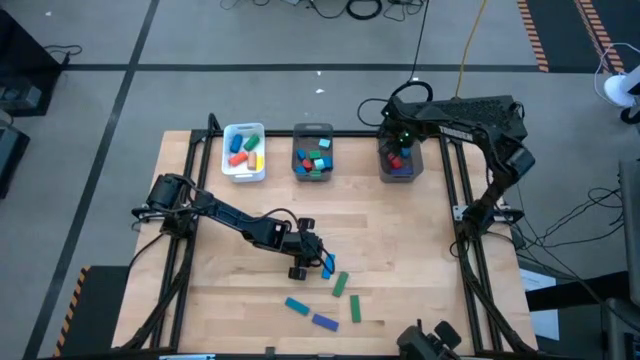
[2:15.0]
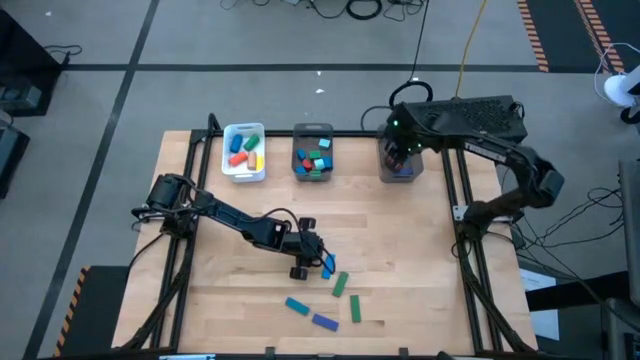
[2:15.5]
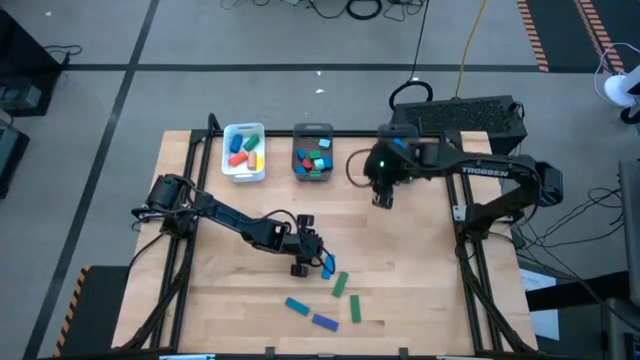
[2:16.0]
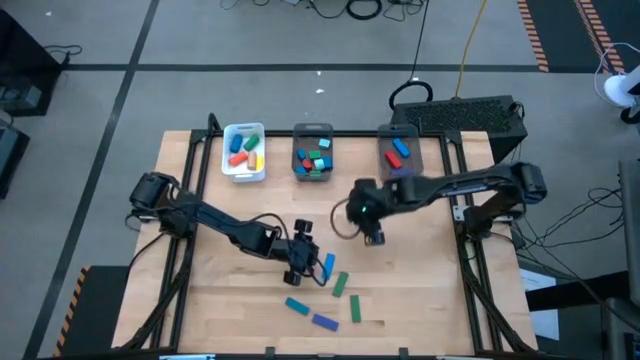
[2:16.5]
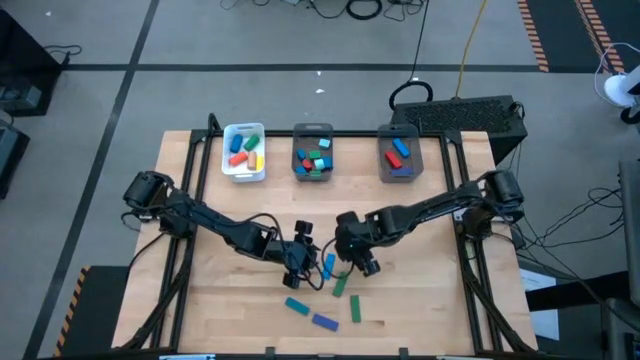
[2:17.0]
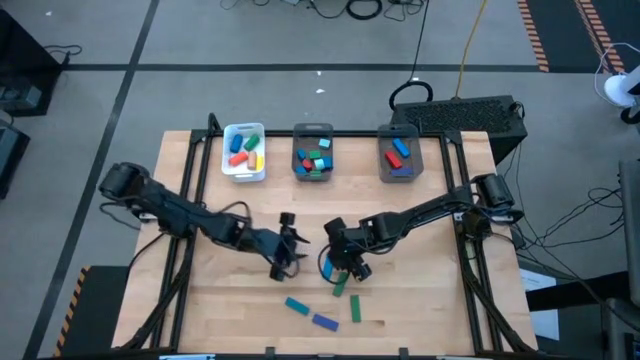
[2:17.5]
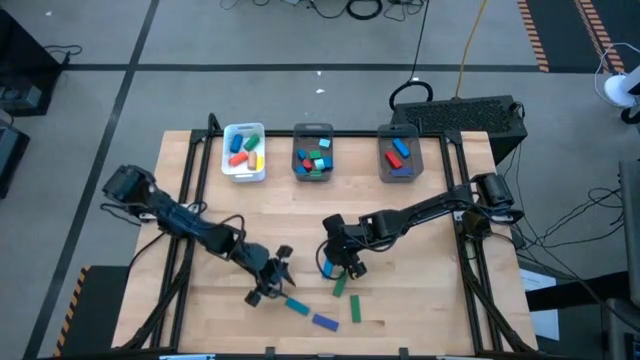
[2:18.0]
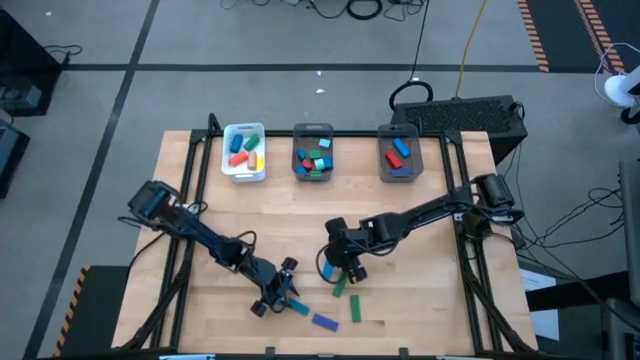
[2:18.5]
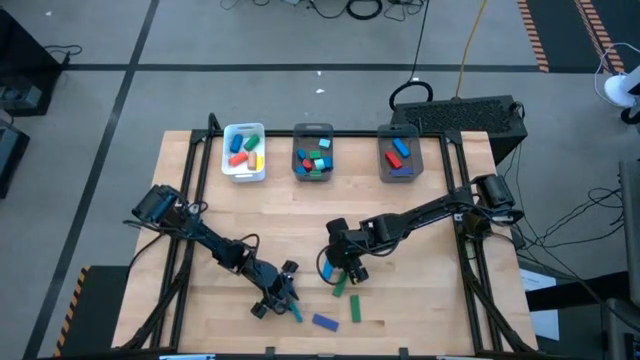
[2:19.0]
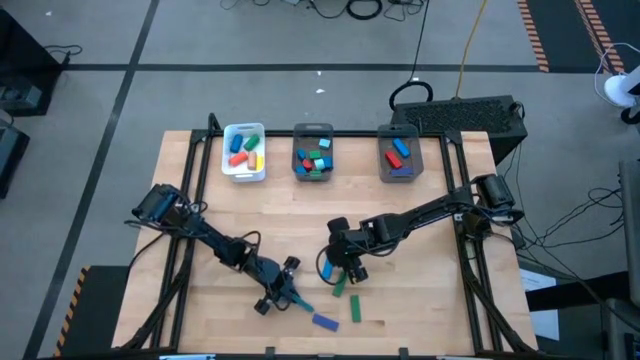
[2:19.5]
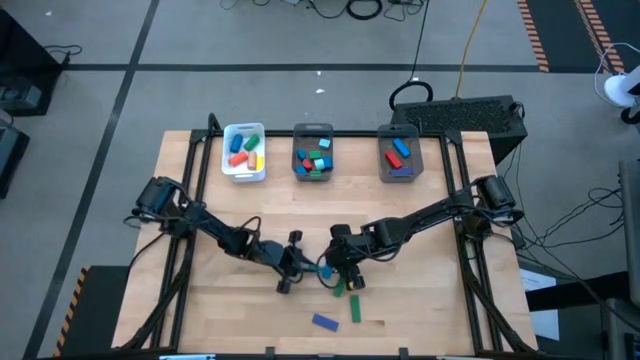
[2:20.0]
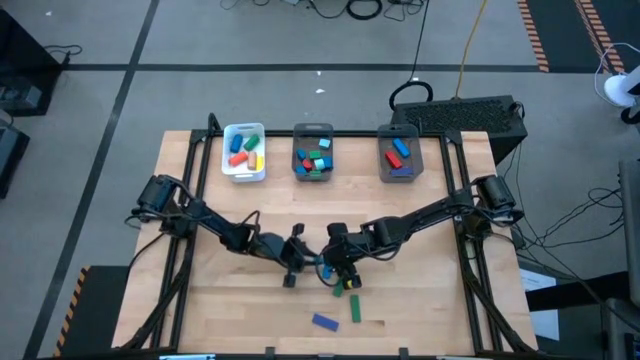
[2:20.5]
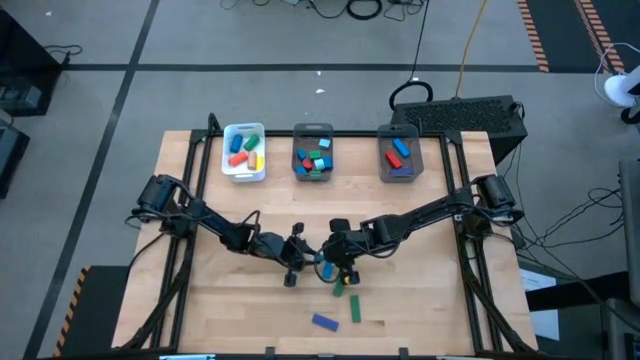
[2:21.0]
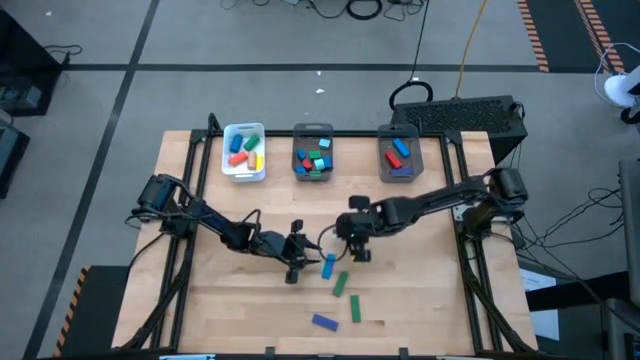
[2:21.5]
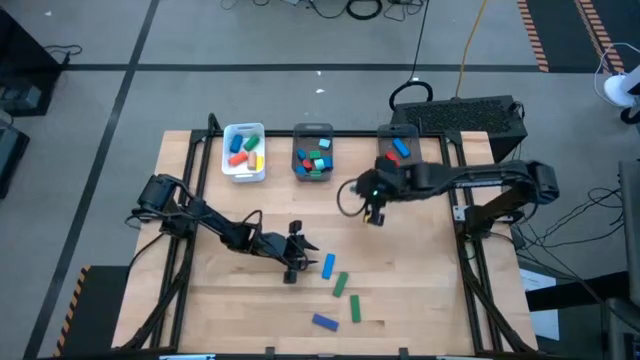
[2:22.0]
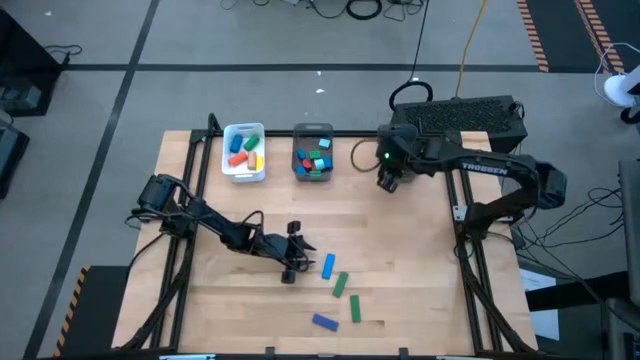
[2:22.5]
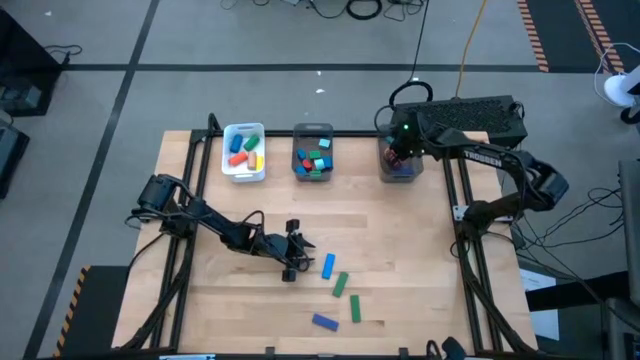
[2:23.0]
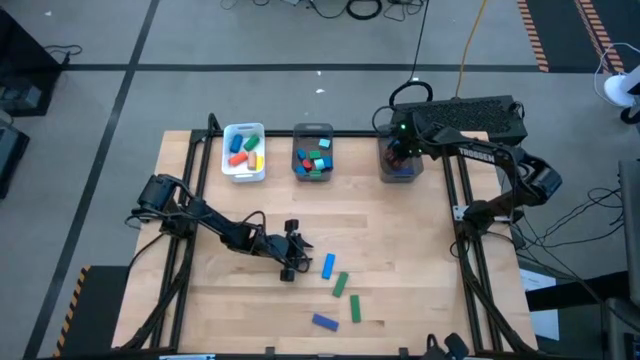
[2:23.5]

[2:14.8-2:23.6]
Task: Sort blocks by size
Put the blue rectangular block into the right black bin

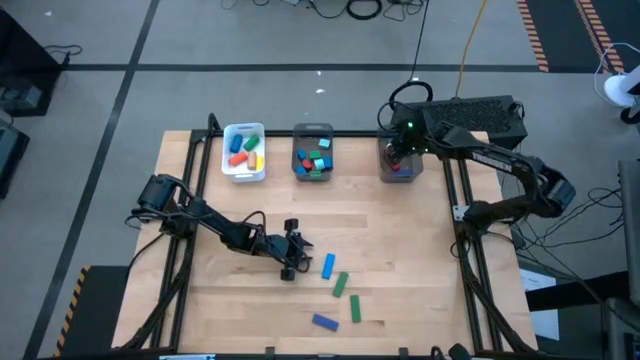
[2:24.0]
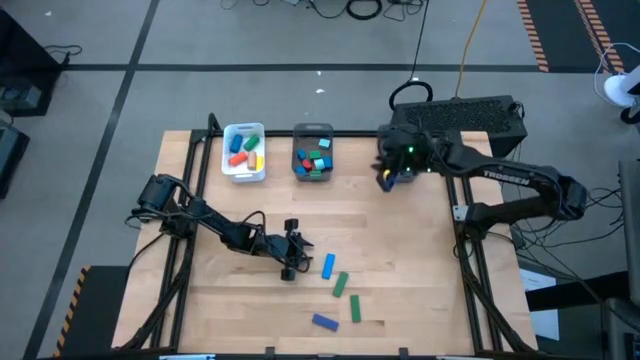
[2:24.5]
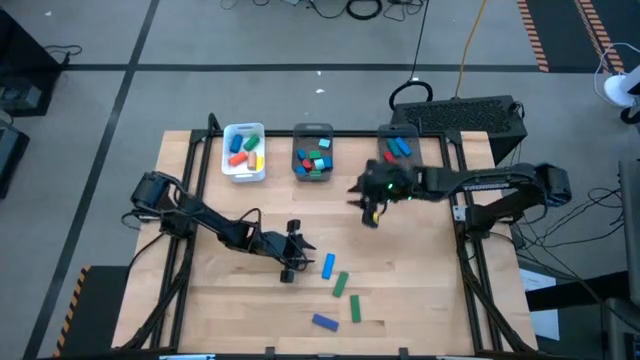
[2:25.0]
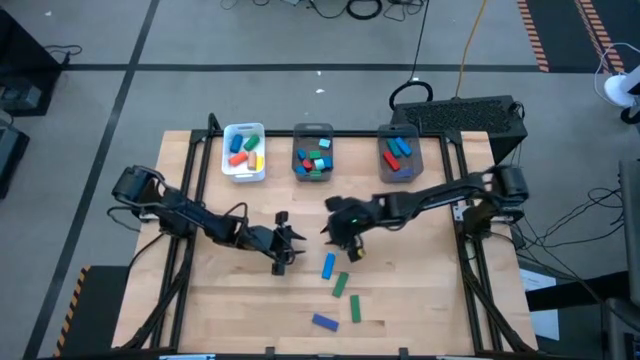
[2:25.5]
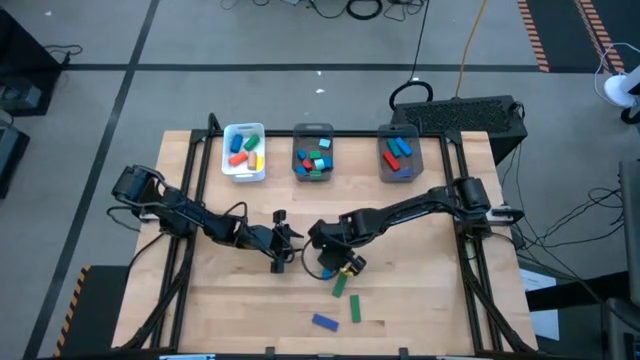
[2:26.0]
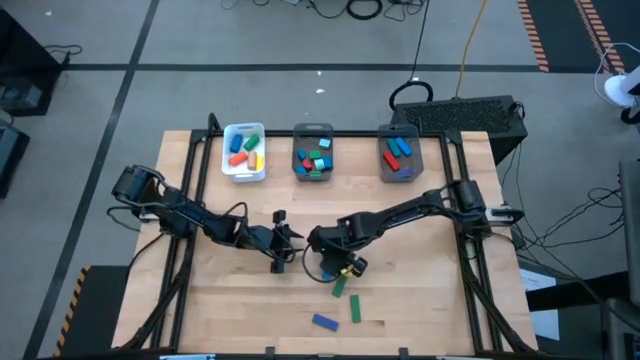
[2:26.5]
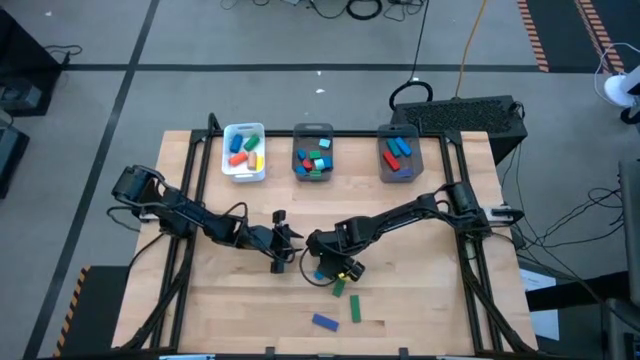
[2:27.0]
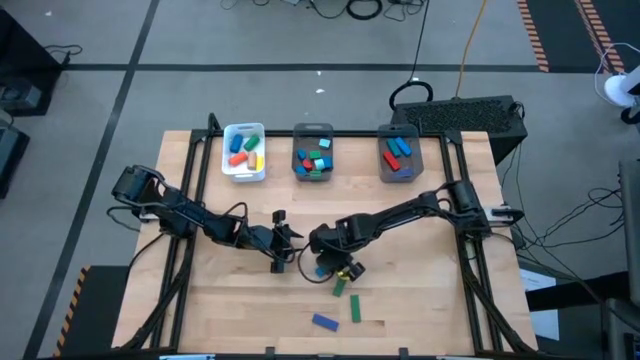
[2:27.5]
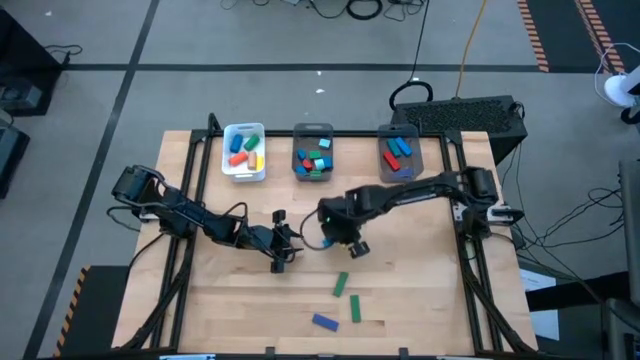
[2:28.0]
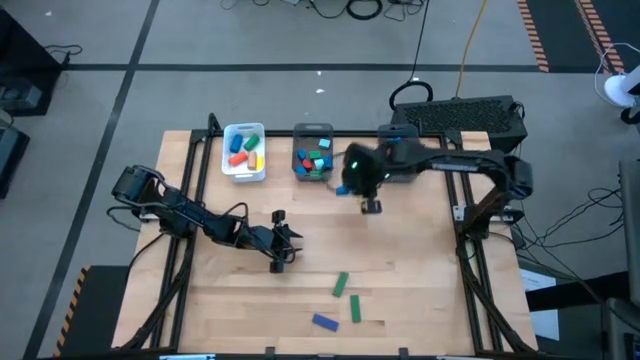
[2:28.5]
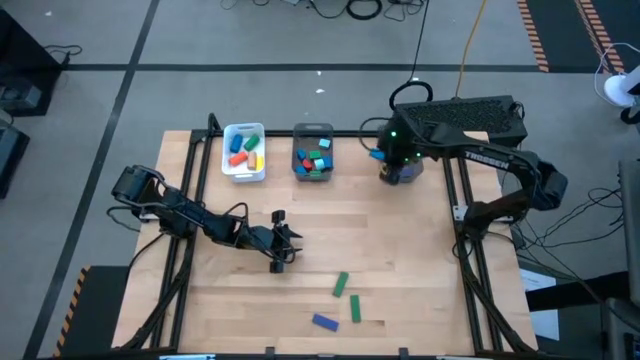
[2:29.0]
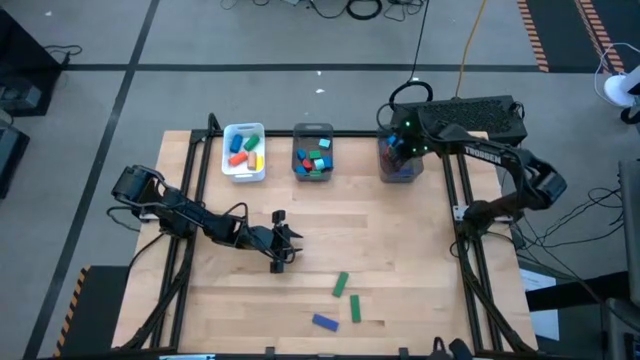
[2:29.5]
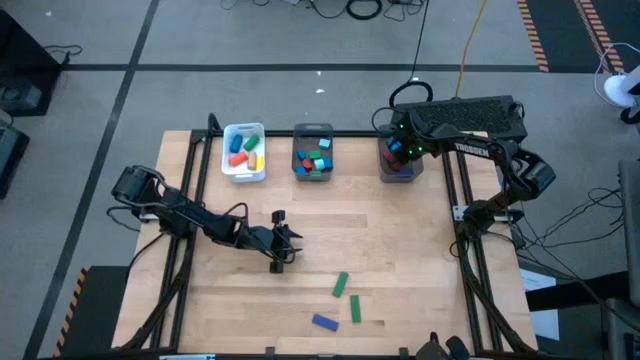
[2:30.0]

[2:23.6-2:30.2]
Put the light blue rectangular block into the right black bin

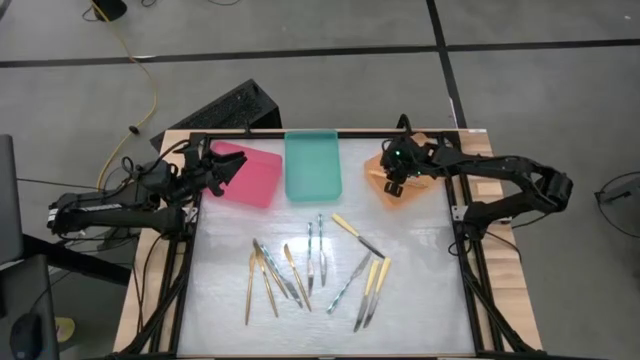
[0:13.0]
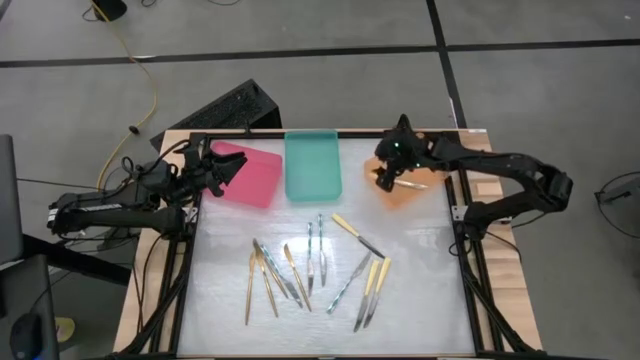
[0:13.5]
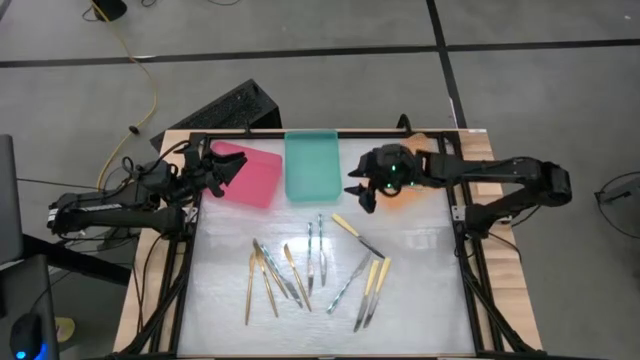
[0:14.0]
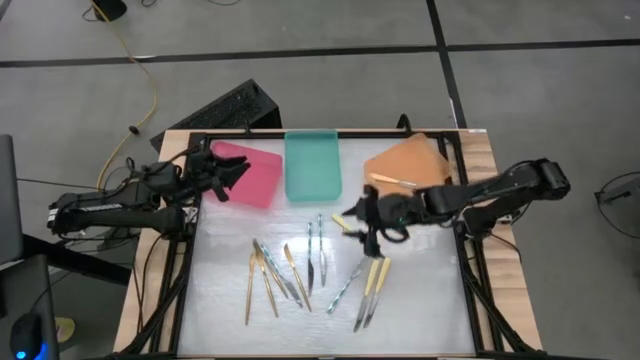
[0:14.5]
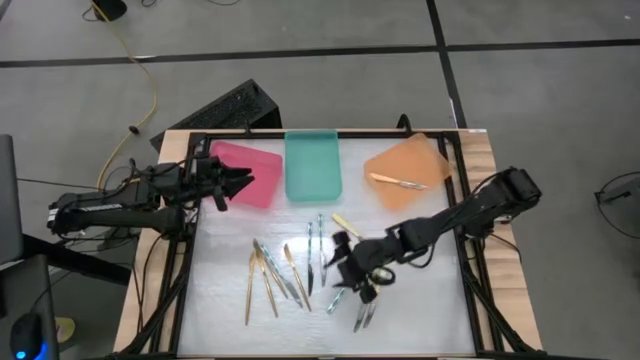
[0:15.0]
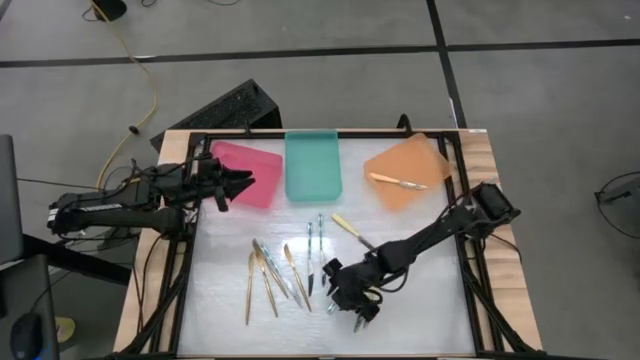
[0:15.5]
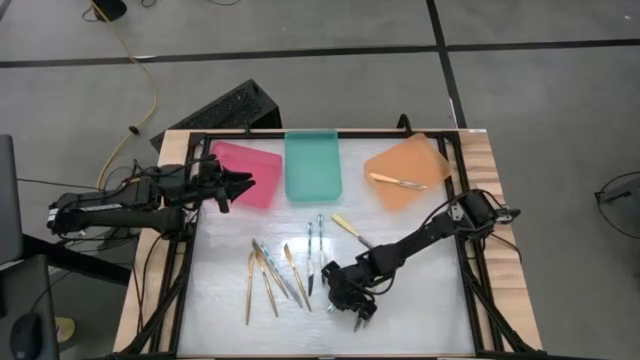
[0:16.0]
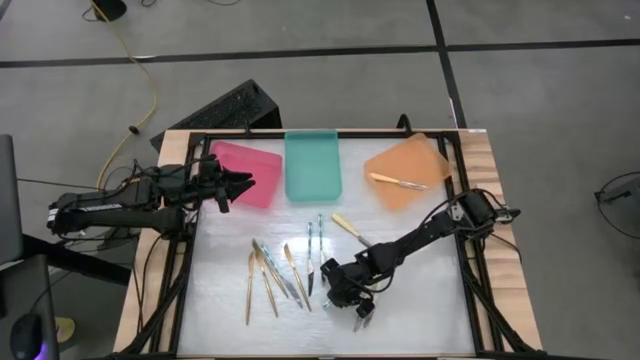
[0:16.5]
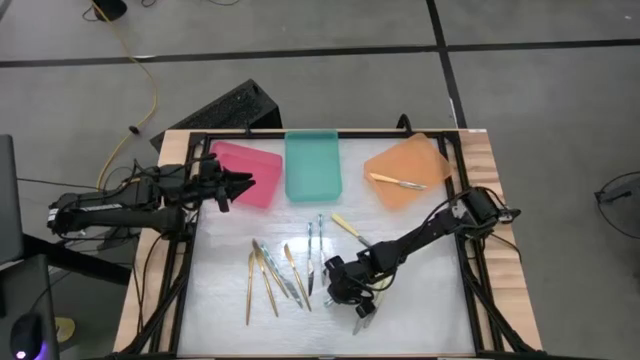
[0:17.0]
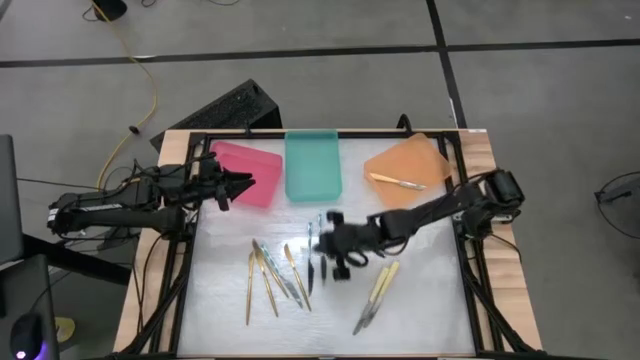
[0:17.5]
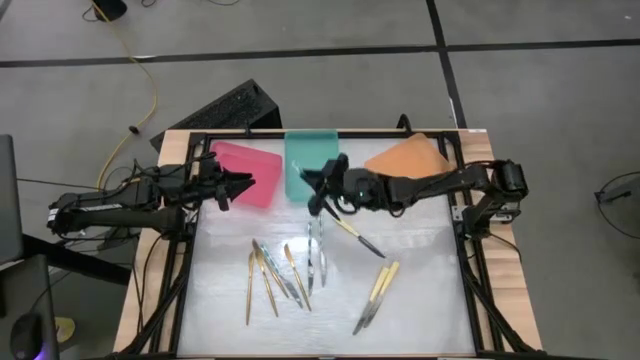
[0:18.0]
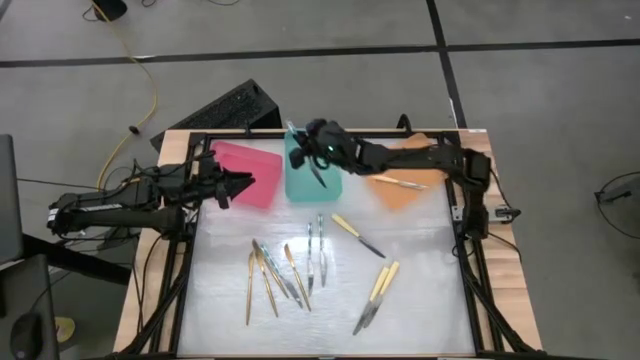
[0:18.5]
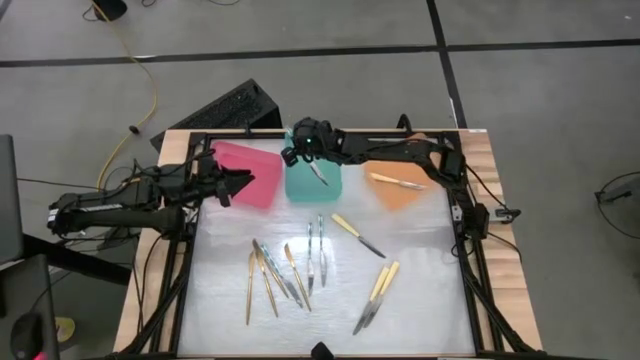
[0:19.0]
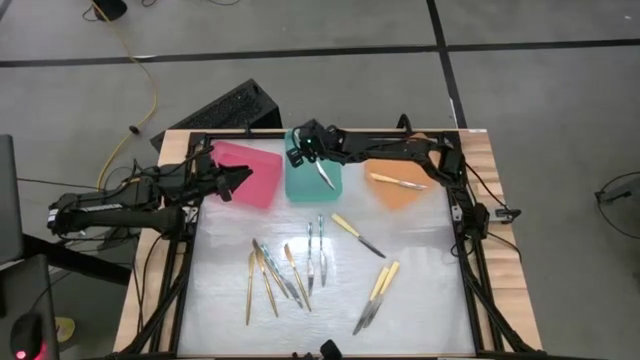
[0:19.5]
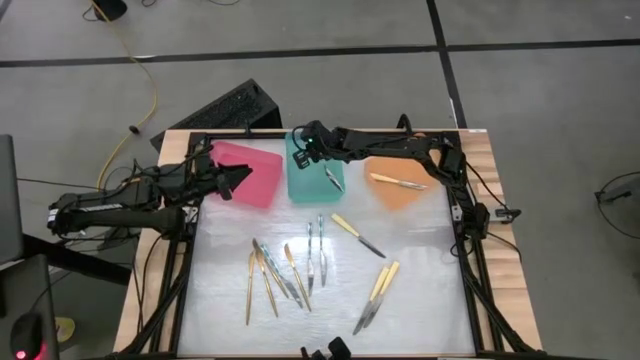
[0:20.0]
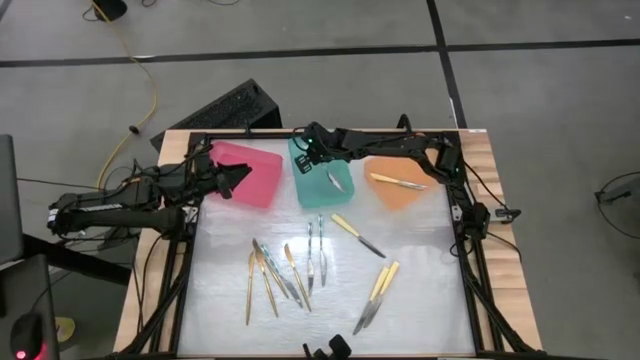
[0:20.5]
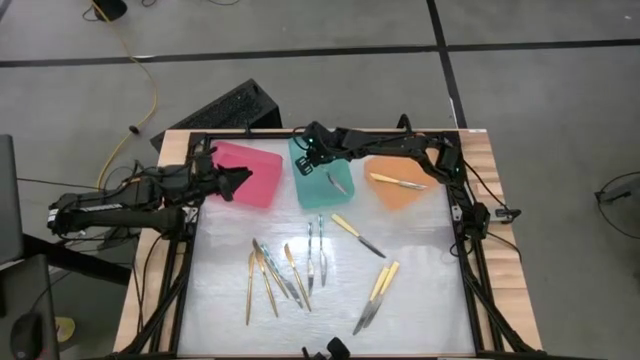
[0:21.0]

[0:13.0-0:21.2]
Task: Sort silverware by color (type)
Put the white and blue knife into the green bin
